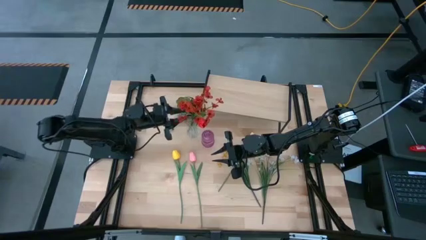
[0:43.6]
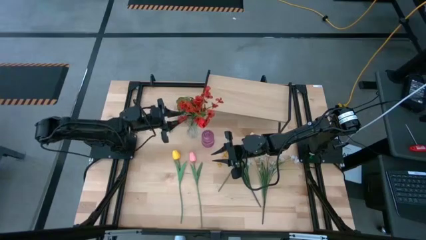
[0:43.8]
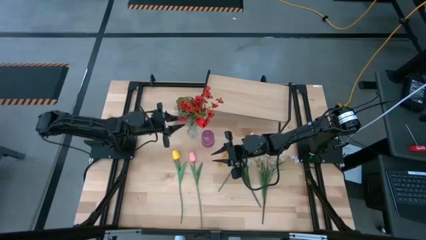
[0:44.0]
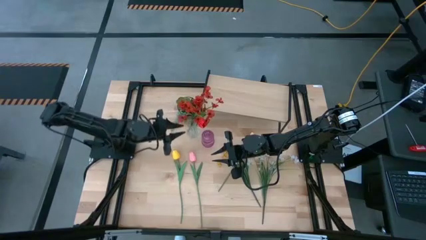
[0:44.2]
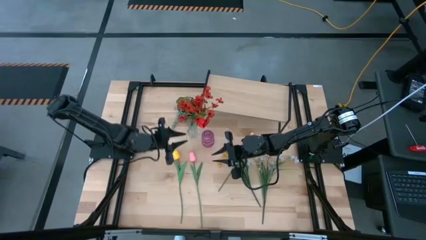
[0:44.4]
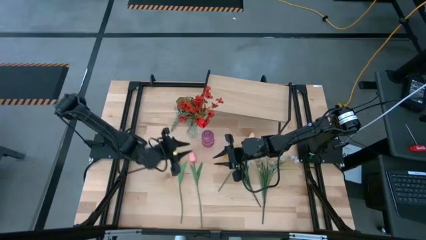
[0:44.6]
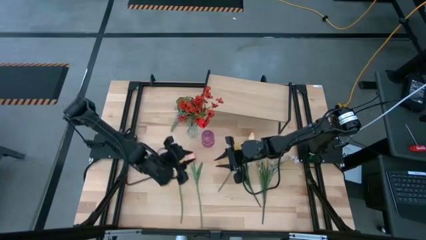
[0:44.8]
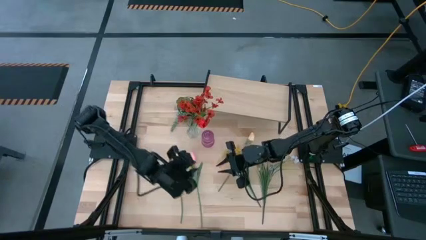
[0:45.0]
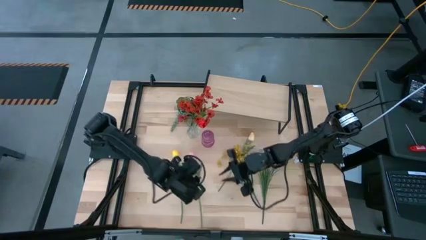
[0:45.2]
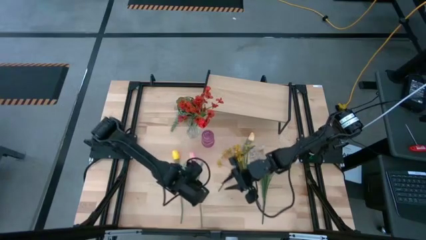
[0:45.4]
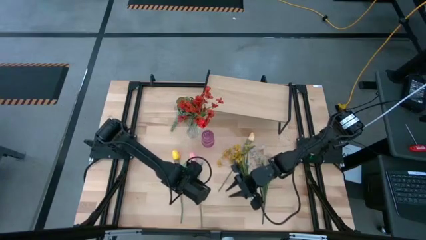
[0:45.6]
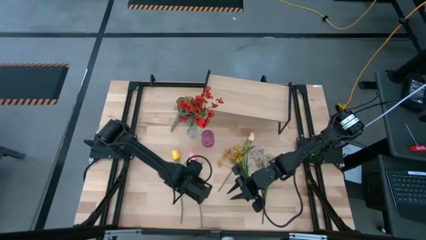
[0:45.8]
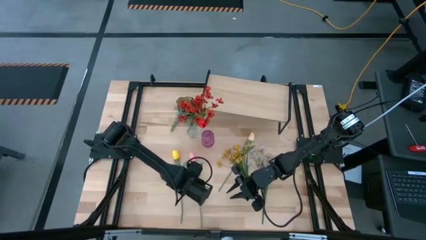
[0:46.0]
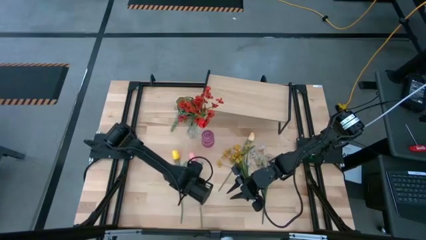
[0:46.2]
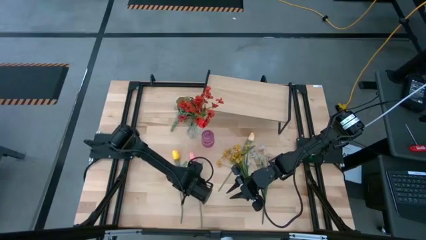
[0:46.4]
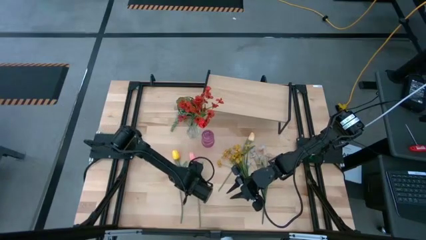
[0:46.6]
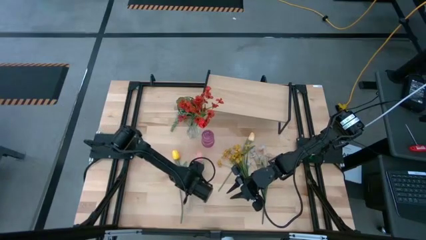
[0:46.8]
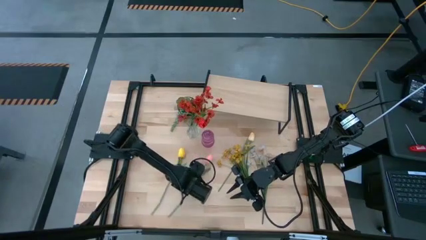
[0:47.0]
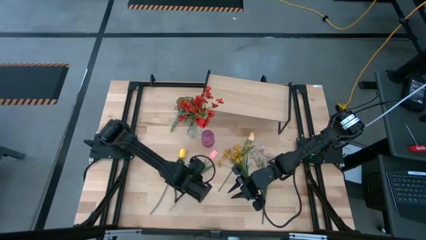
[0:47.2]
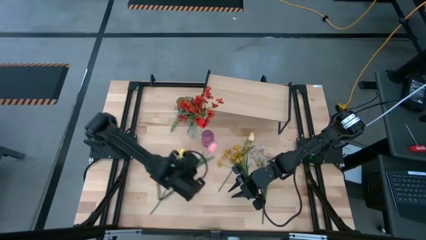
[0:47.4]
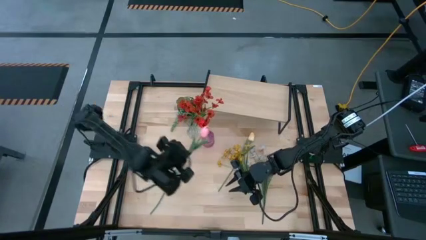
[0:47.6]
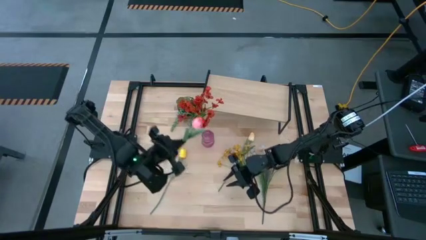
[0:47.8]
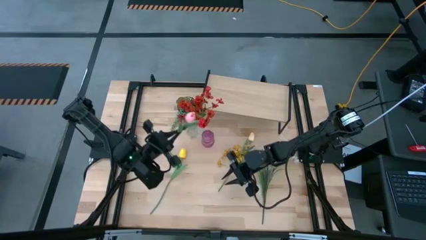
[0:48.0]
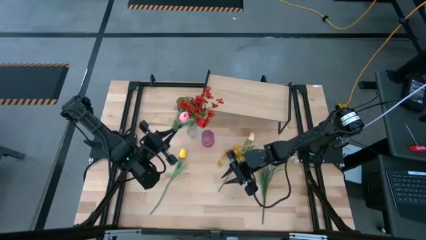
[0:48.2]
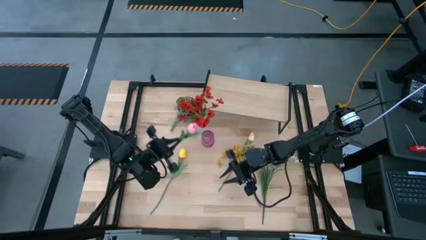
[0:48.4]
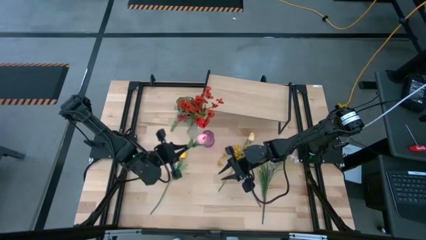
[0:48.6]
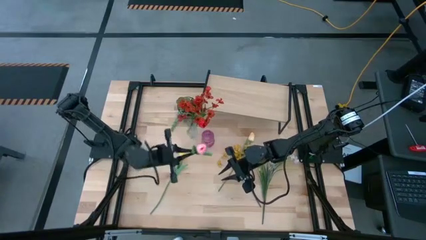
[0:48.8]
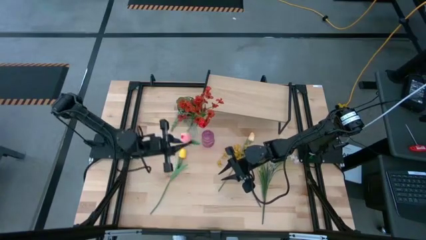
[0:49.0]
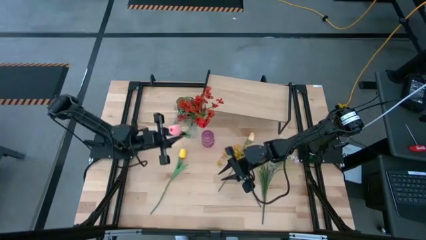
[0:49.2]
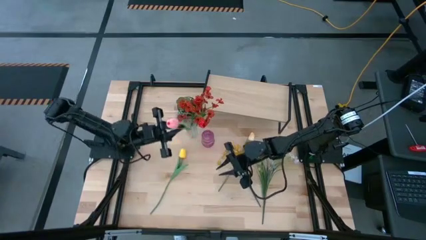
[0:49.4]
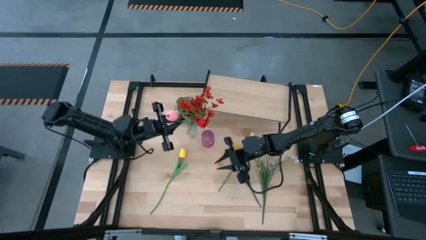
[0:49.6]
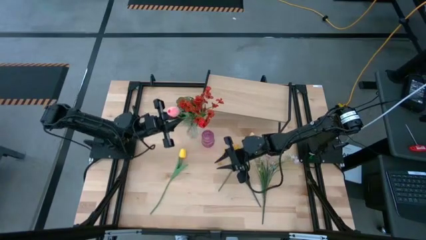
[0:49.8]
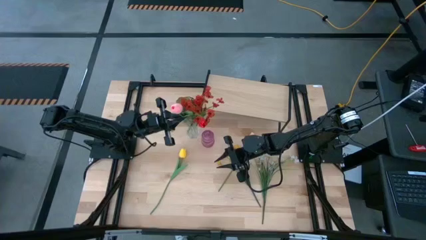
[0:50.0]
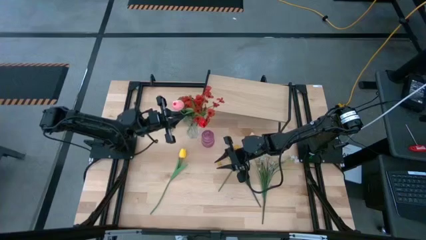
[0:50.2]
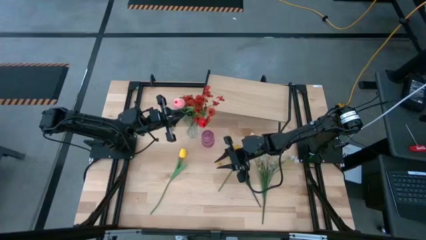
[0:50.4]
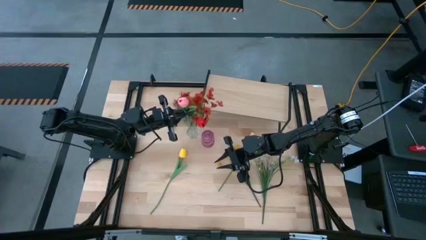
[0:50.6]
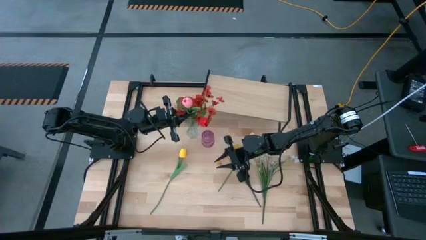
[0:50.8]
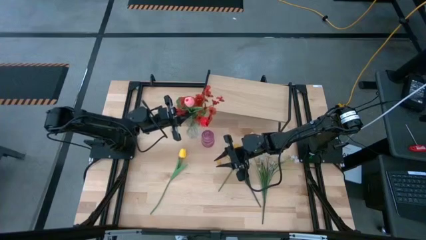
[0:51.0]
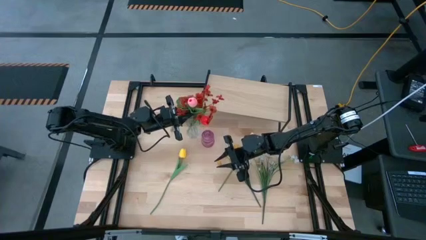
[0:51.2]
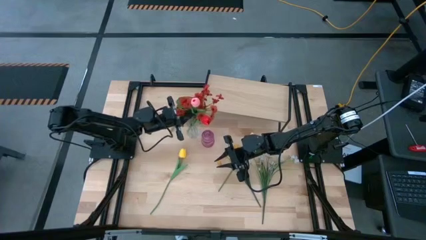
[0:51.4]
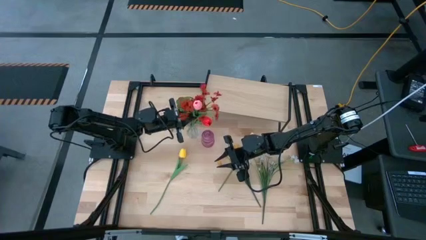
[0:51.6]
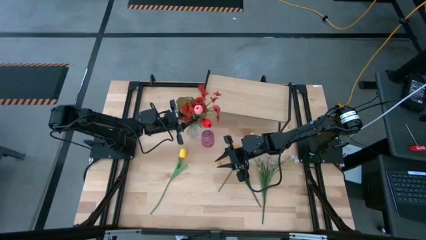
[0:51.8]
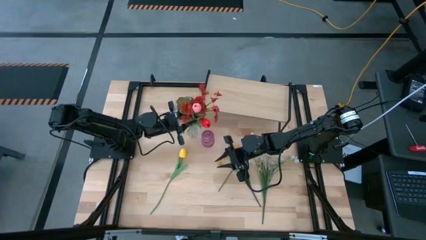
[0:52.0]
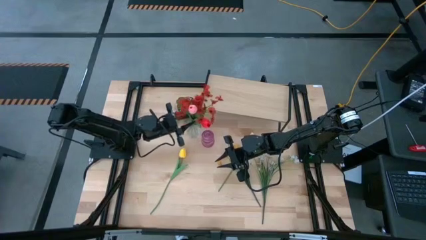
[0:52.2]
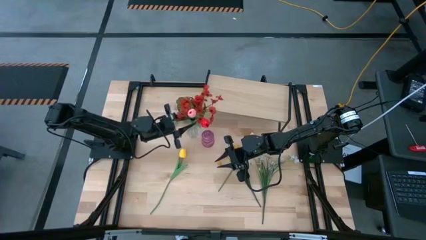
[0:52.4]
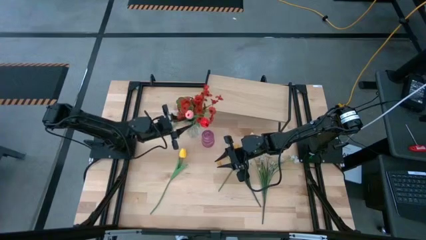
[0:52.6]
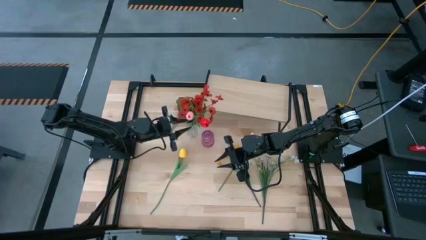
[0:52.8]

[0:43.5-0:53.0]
Task: Pick and place flowers into a vace then onto a shelf
Put the pink flower into the transparent vase
